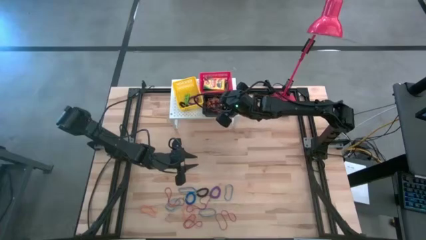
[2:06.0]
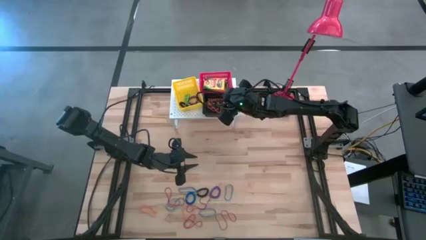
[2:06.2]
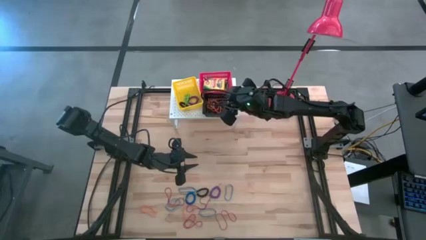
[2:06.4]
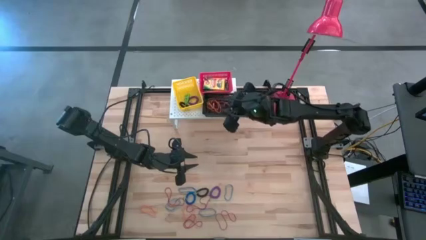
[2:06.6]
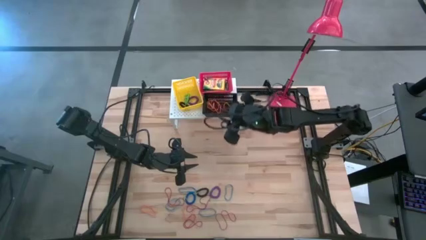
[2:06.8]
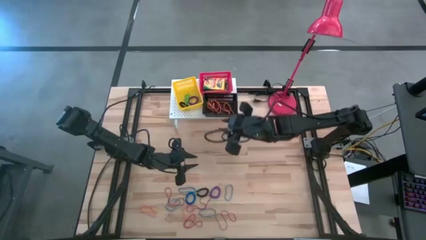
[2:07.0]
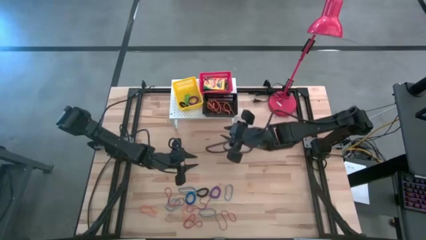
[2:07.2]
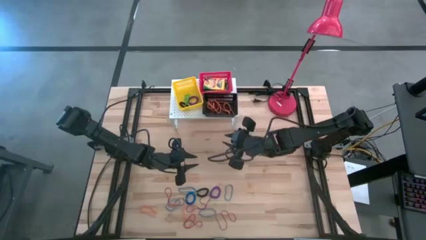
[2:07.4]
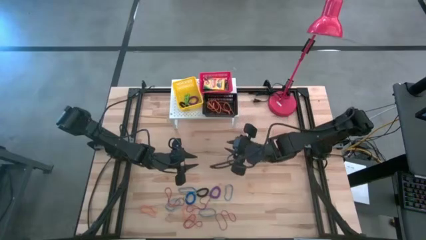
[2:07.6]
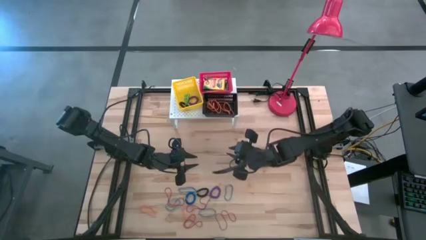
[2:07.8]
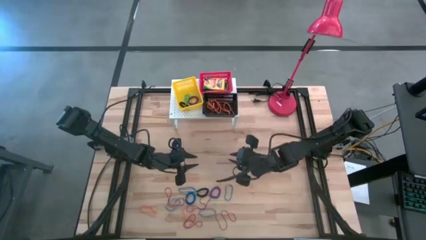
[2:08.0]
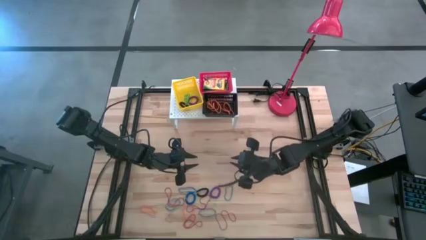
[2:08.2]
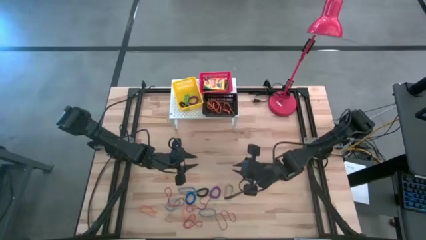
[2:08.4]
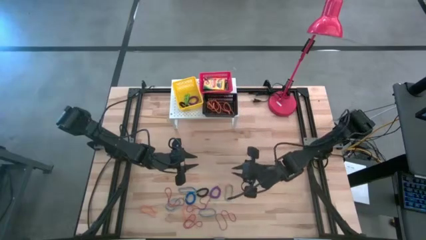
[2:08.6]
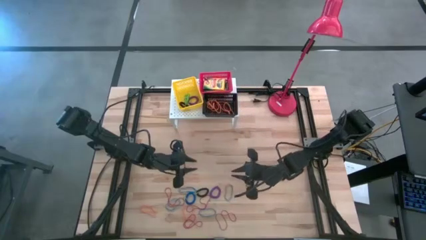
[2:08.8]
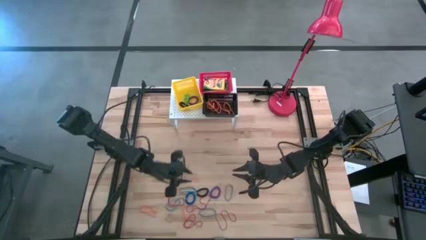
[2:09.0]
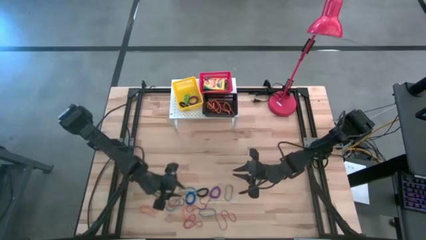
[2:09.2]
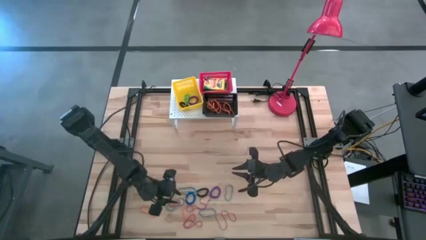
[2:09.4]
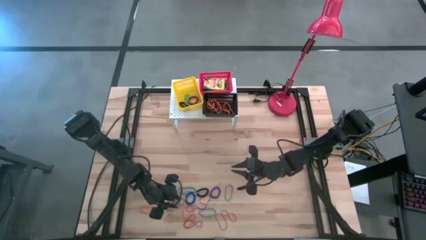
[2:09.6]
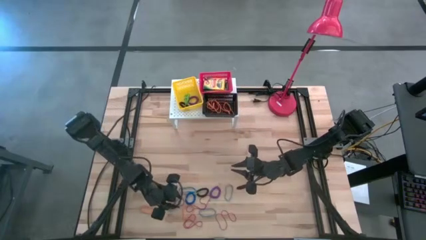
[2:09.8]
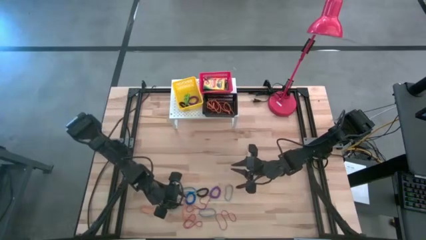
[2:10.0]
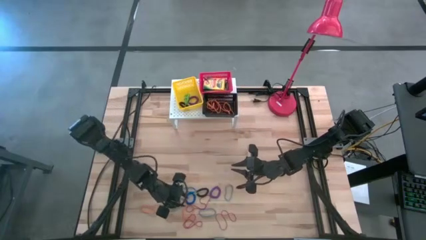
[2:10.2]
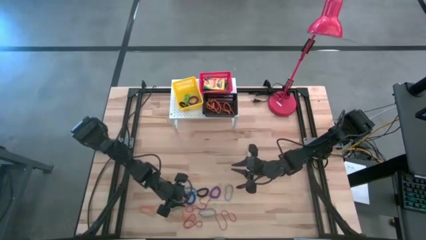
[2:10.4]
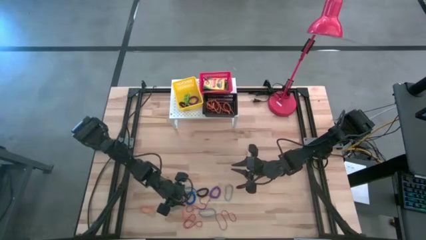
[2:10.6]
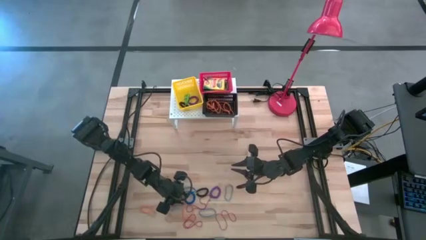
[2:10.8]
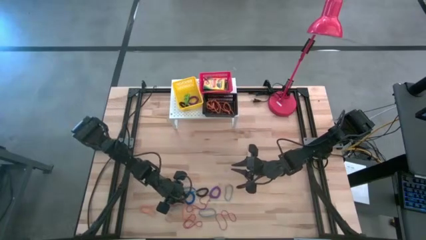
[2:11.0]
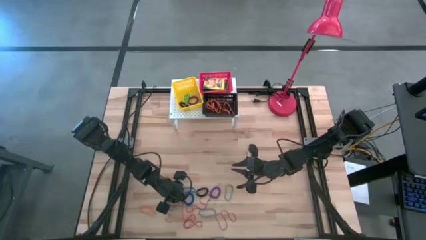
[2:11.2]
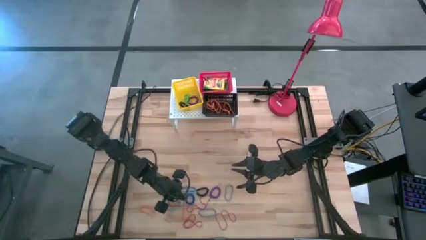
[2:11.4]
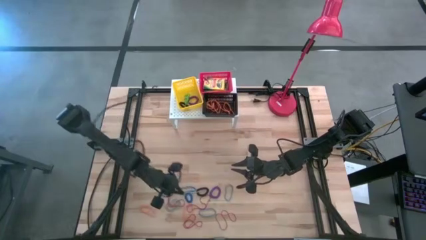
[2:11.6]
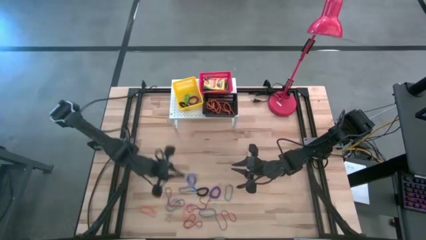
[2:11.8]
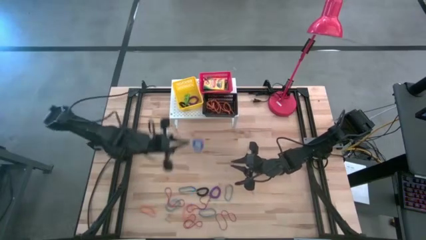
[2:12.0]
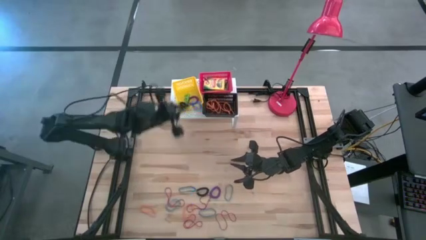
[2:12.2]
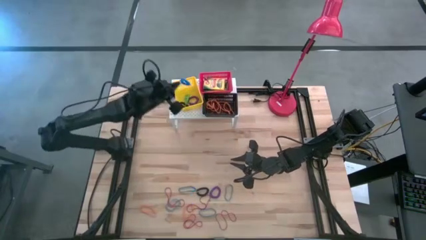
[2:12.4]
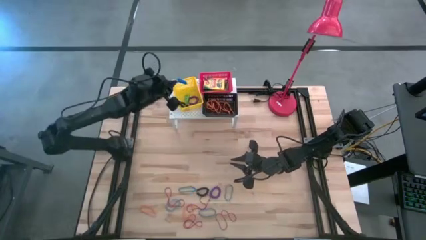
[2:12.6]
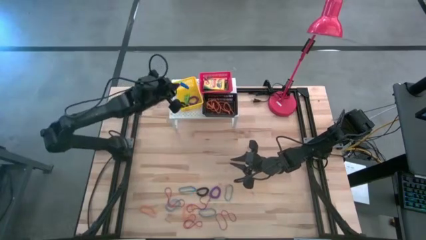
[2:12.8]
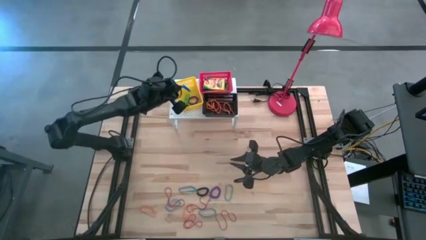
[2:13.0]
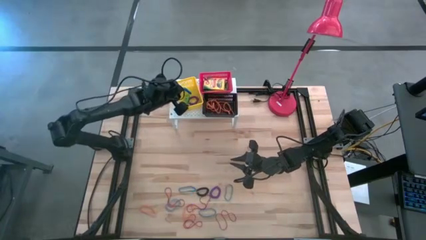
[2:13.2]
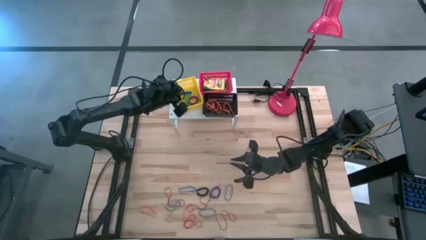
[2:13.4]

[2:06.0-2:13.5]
Task: Pick & Place Office Desk Supplies
Put the blue spring keychain into the yellow bin on the shelf

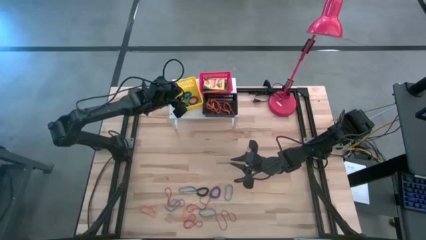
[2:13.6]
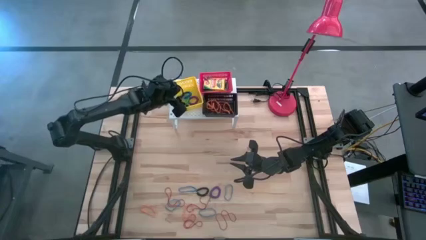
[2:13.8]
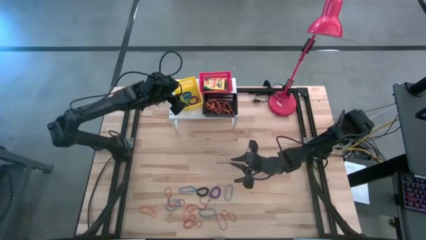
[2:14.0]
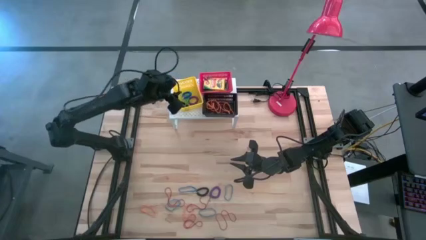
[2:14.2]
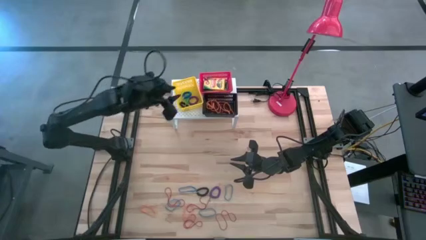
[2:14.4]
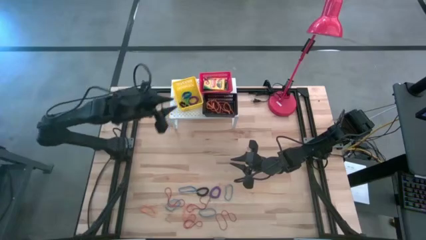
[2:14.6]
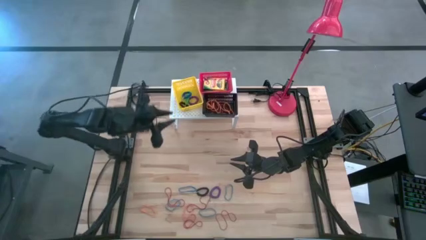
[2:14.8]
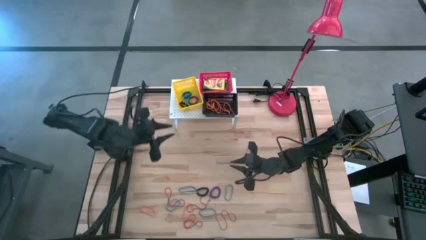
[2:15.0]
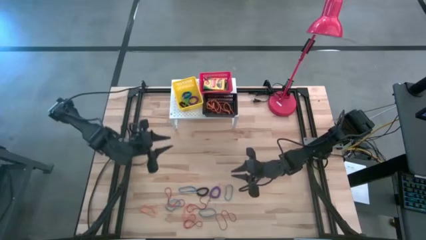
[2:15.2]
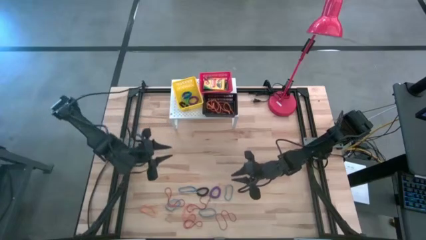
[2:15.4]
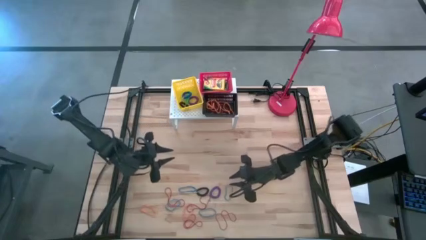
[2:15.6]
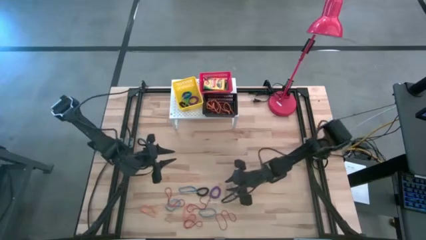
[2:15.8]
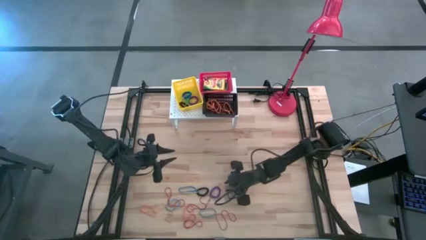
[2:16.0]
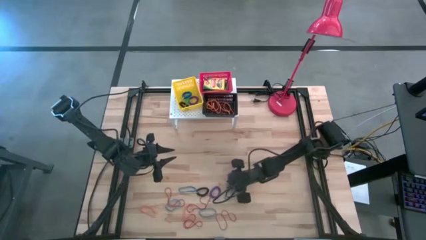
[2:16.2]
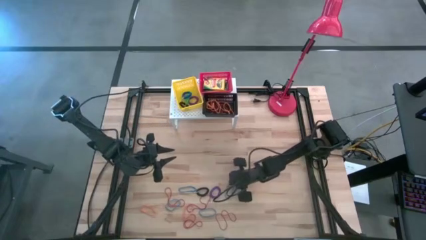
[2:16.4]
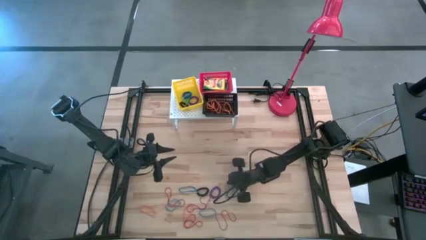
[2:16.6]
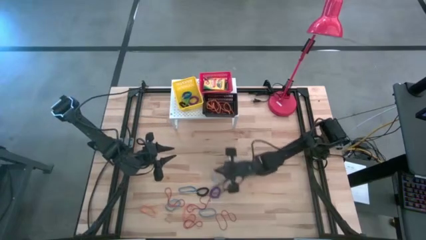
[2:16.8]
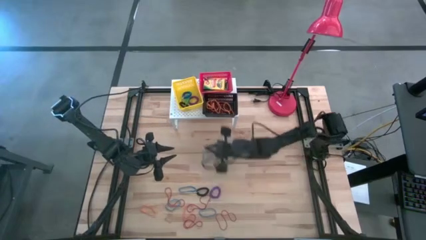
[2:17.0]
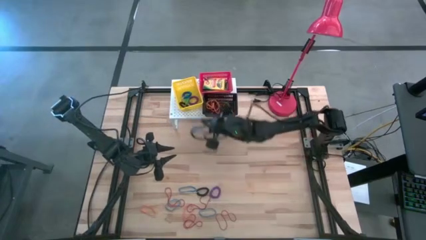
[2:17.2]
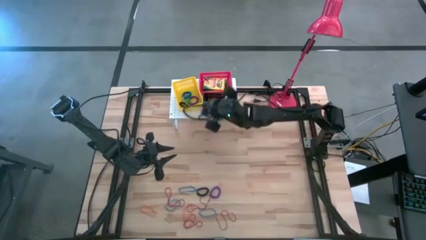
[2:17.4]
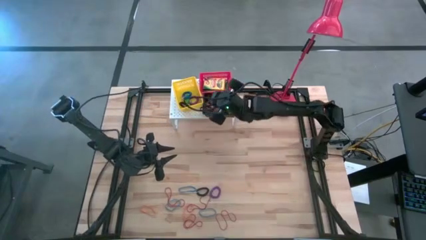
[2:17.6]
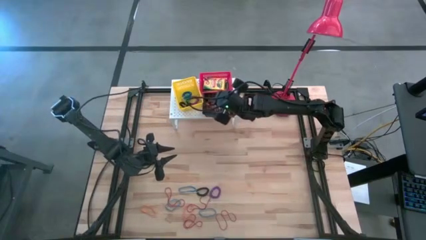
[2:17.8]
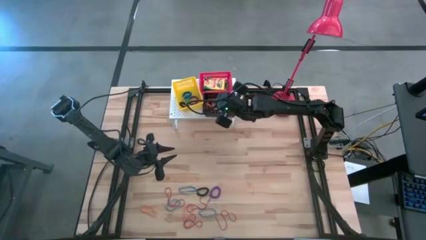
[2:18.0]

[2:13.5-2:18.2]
Put the blue rubber band into the black bin on the shelf

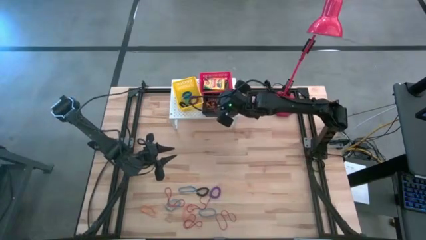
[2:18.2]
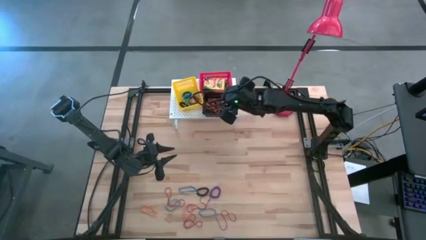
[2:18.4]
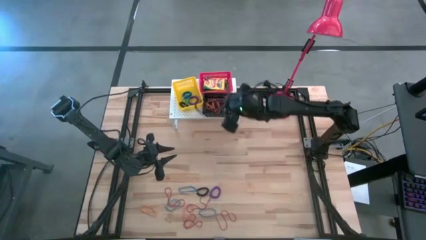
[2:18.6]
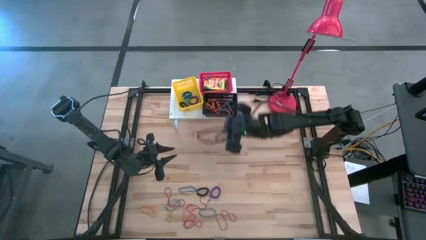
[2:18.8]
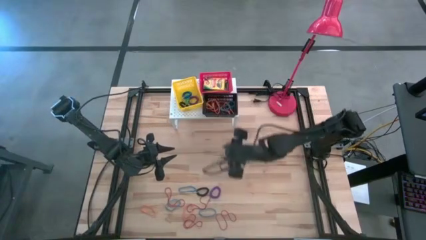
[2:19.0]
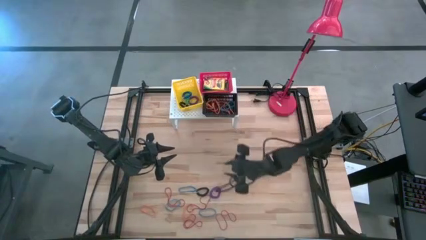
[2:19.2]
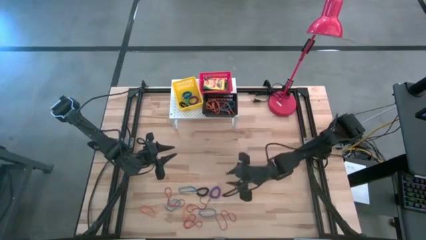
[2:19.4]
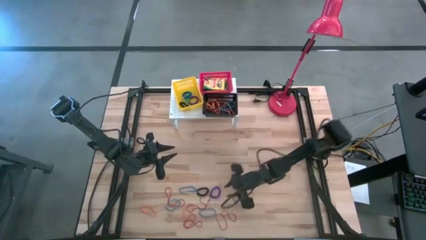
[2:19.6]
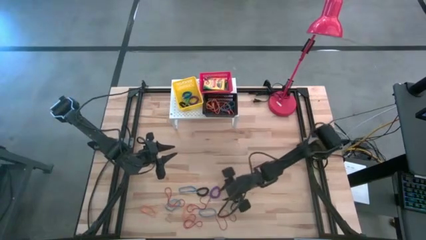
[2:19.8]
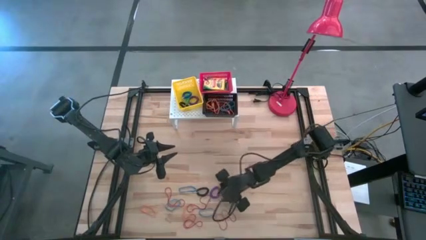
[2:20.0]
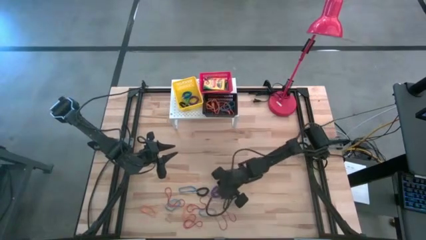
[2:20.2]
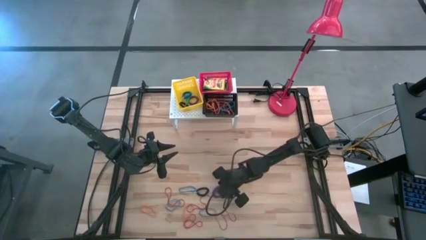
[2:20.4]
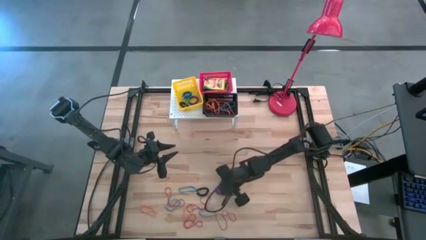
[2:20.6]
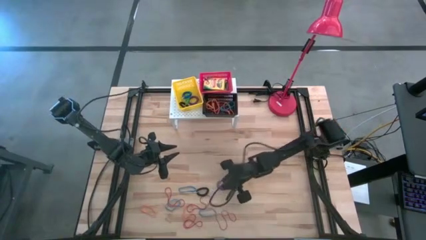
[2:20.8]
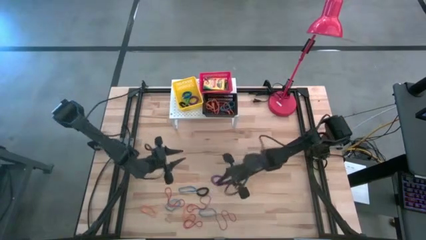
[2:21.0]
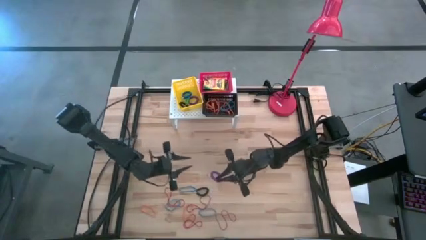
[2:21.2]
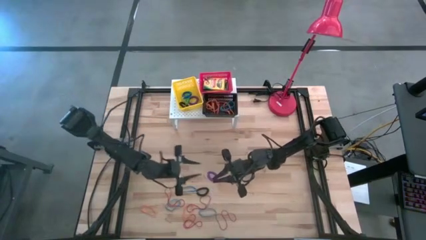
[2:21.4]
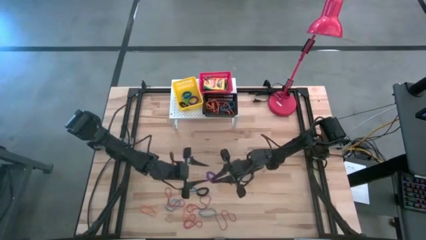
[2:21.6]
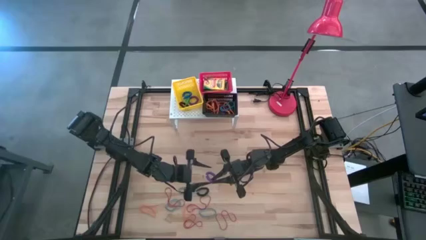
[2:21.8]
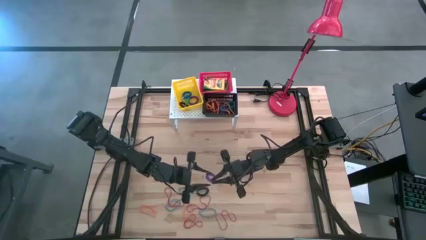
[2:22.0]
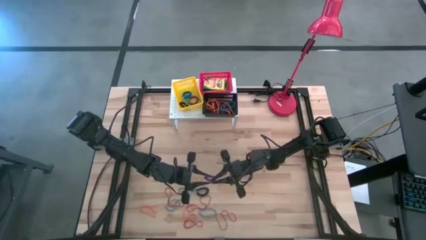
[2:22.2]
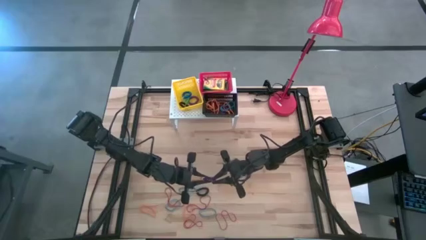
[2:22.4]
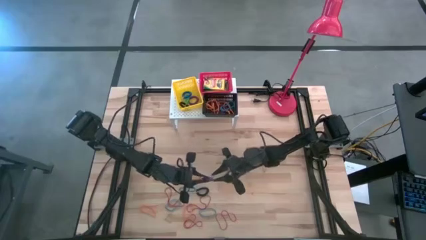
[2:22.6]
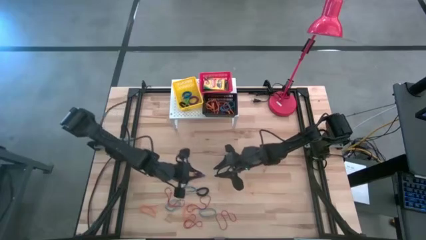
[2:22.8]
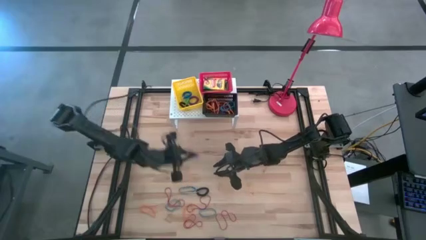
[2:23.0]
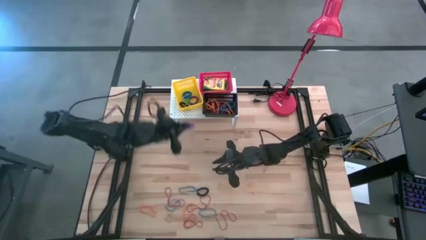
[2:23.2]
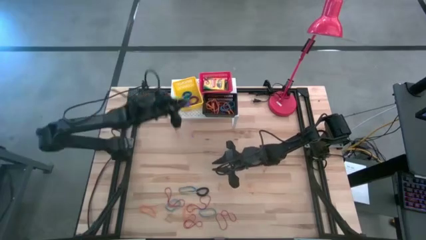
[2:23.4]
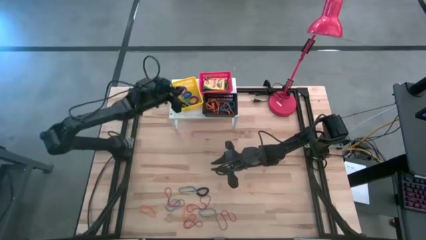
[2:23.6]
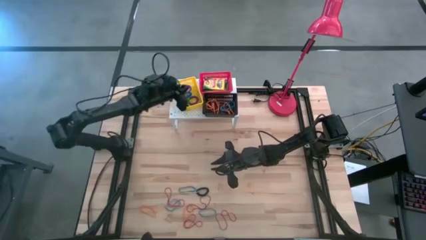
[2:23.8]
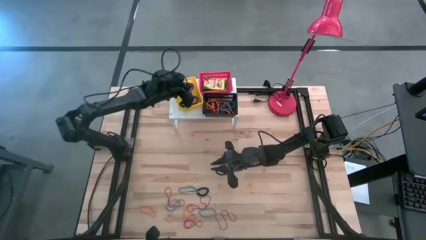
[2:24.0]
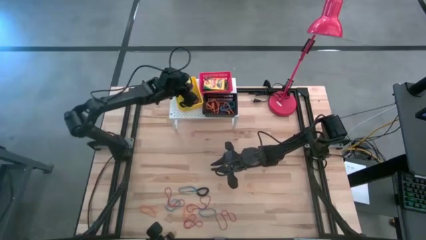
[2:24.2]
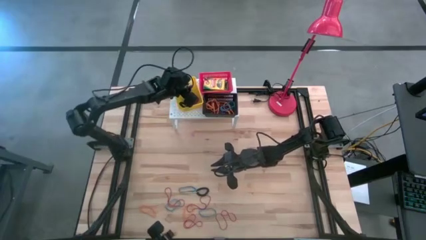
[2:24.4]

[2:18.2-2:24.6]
Put the purple spring keychain into the yellow bin on the shelf
